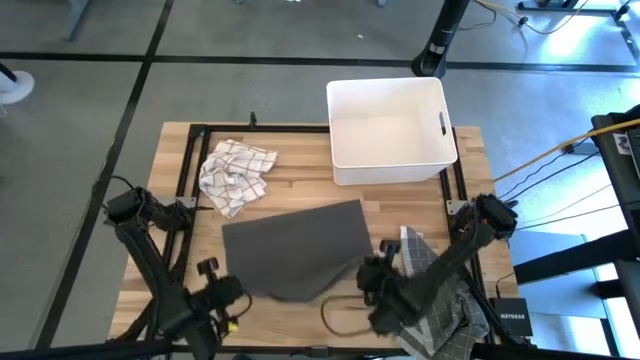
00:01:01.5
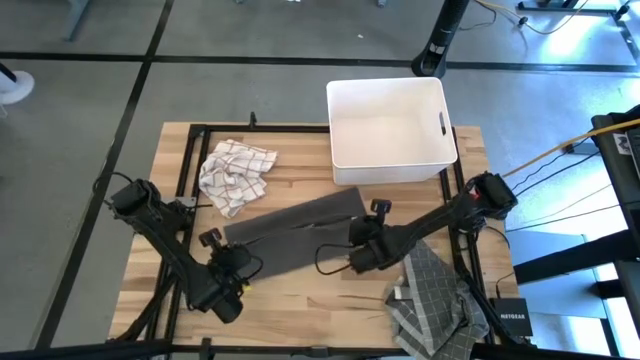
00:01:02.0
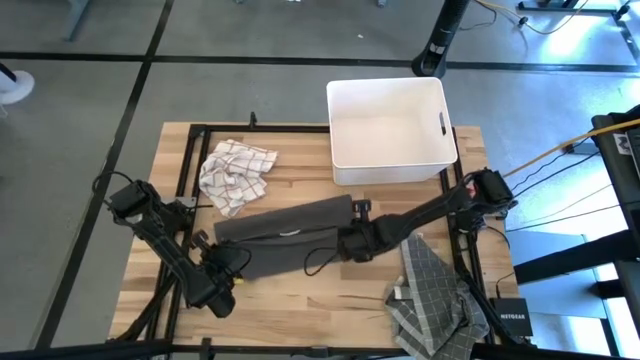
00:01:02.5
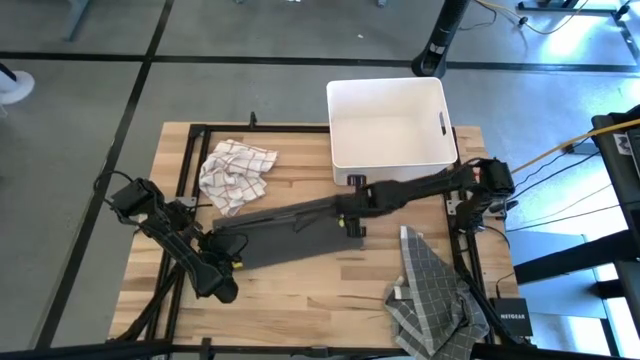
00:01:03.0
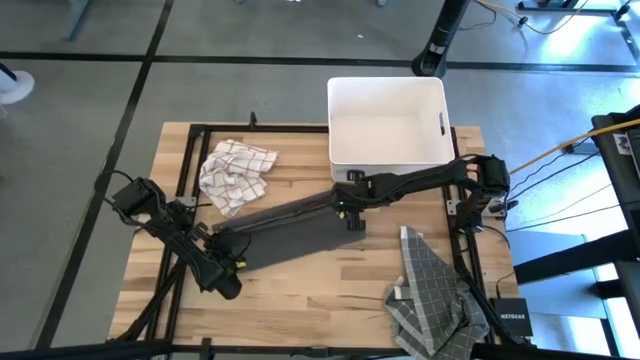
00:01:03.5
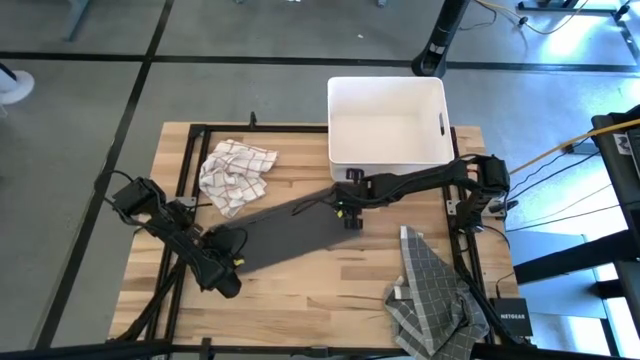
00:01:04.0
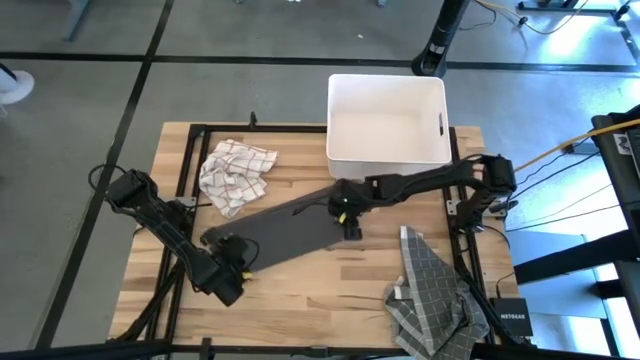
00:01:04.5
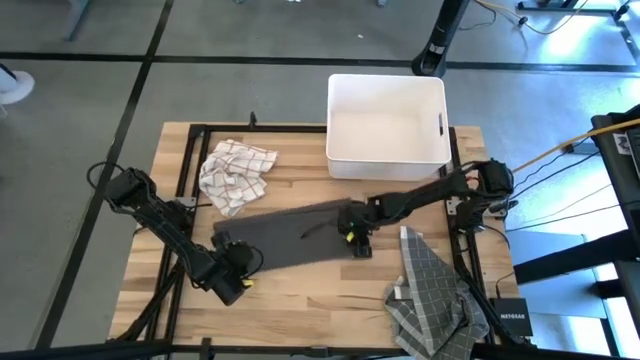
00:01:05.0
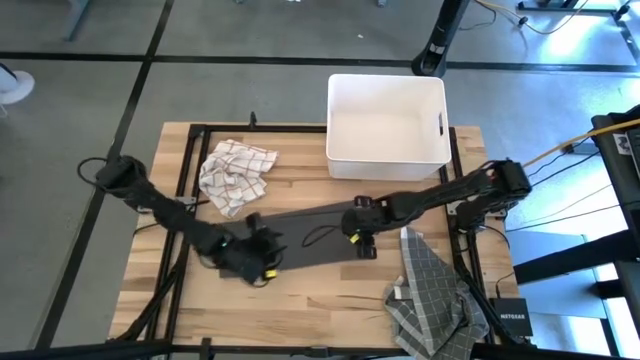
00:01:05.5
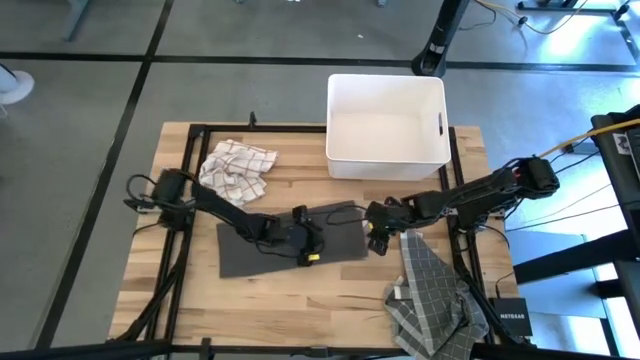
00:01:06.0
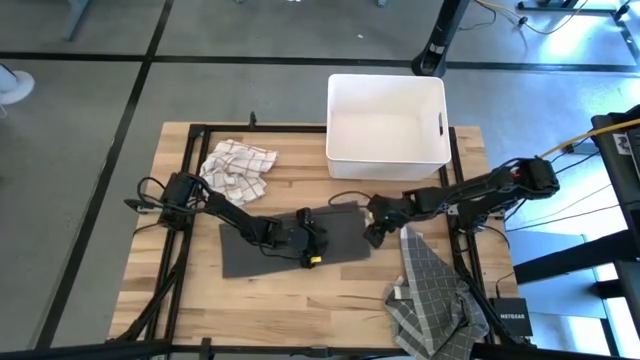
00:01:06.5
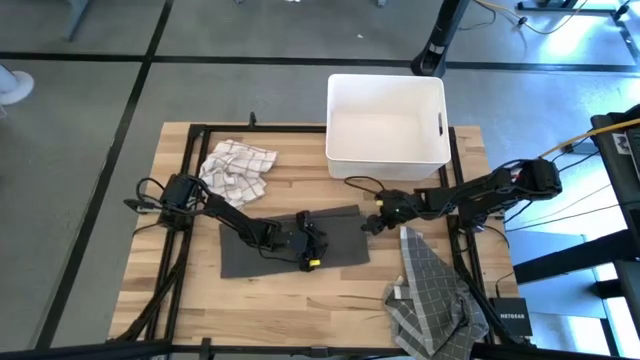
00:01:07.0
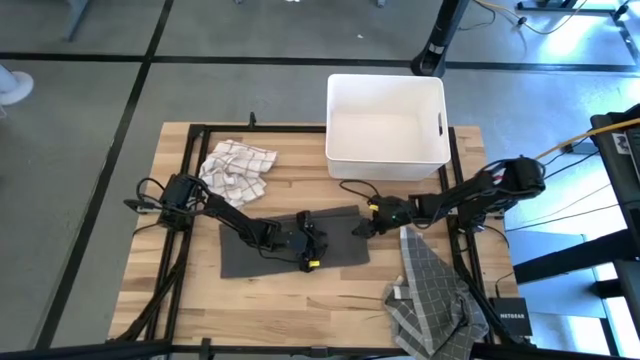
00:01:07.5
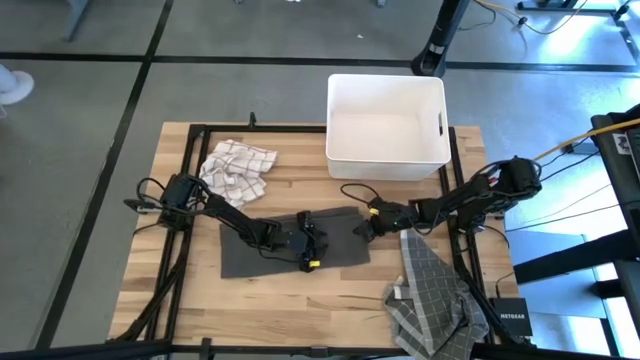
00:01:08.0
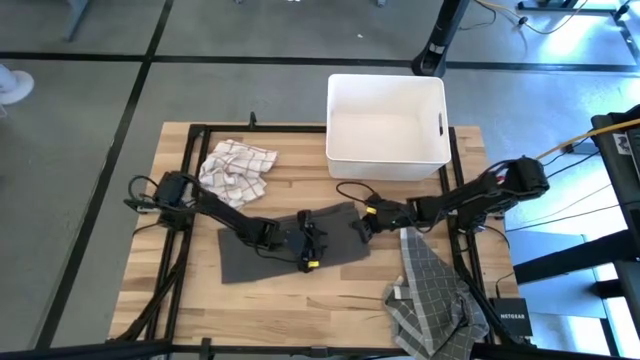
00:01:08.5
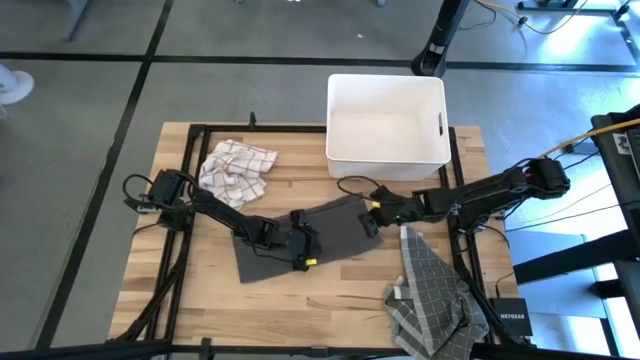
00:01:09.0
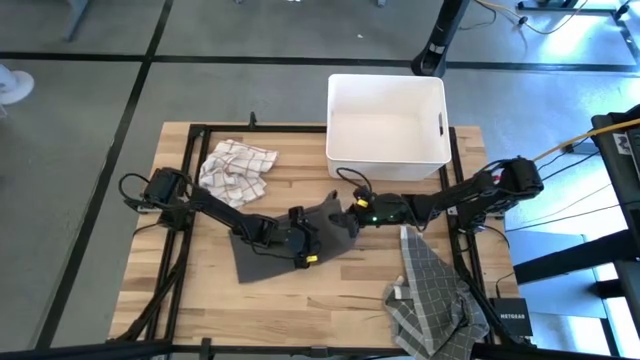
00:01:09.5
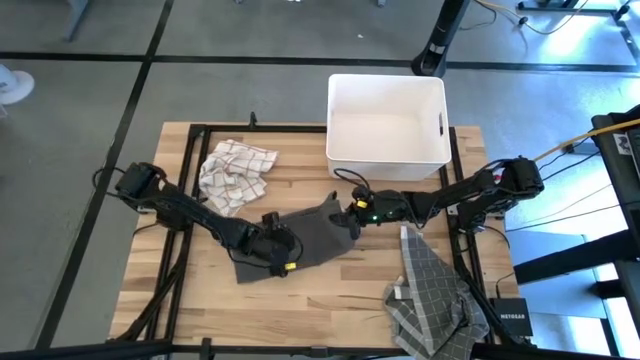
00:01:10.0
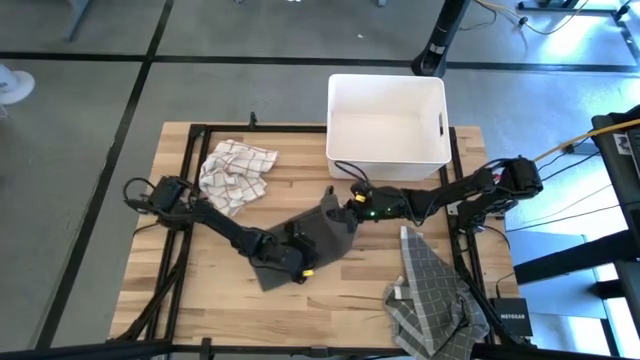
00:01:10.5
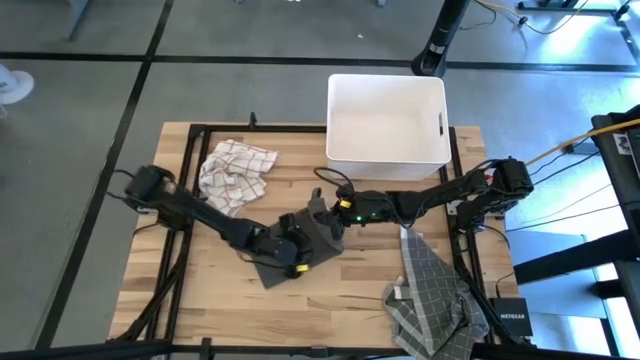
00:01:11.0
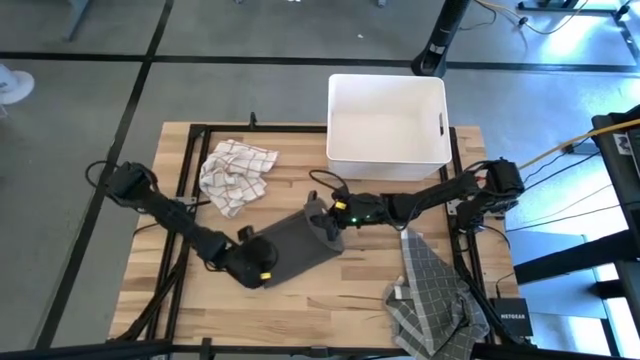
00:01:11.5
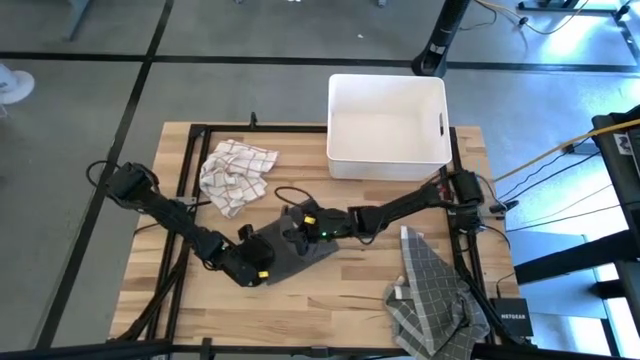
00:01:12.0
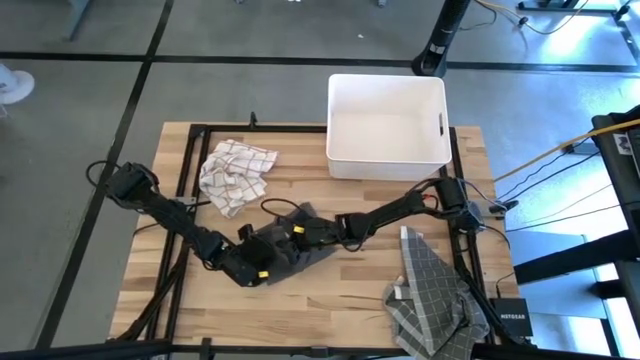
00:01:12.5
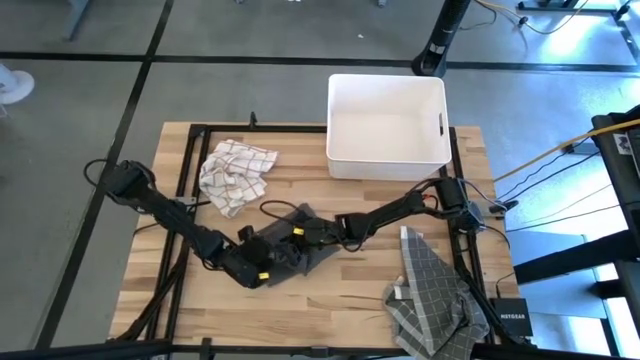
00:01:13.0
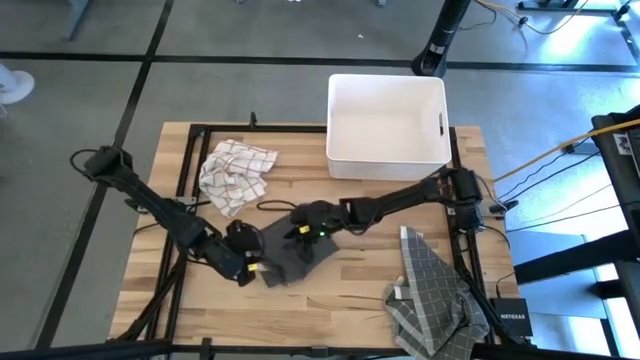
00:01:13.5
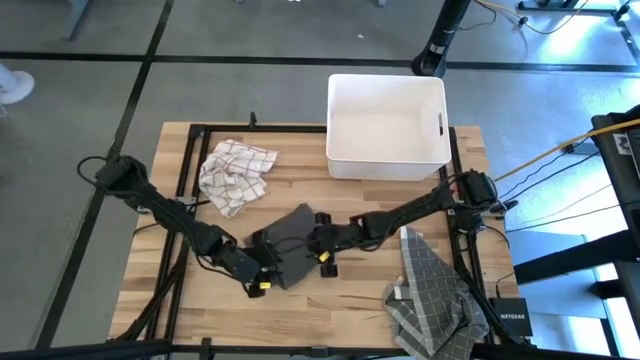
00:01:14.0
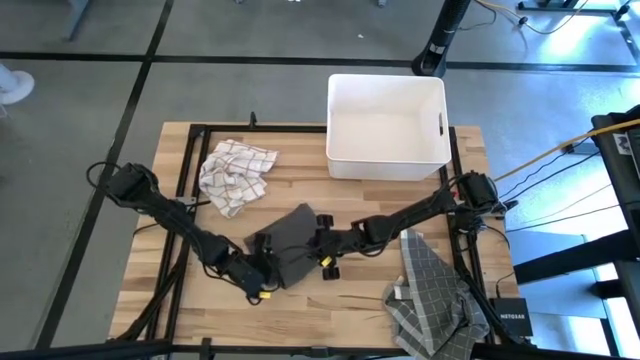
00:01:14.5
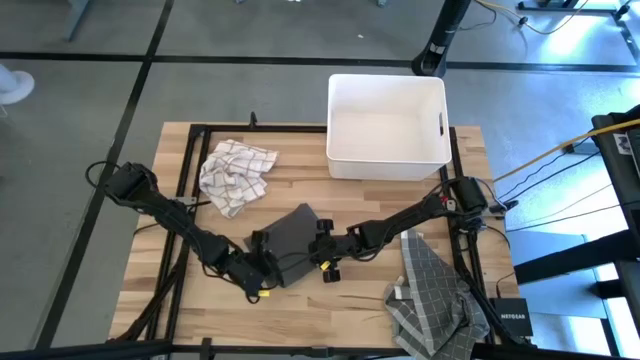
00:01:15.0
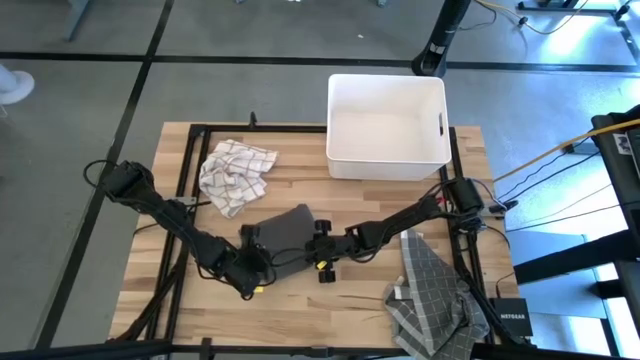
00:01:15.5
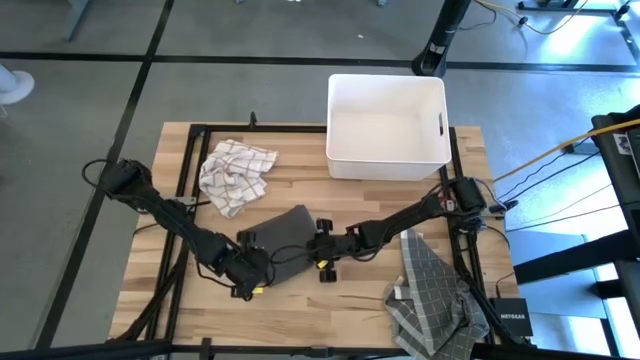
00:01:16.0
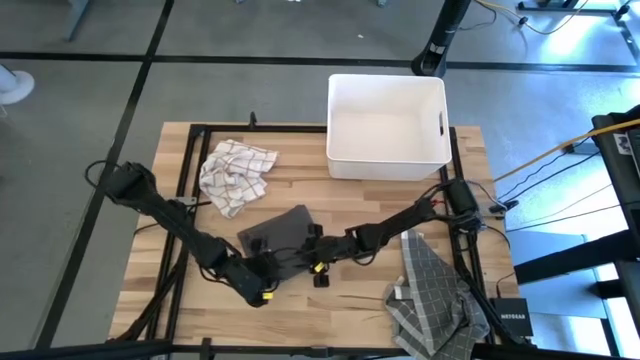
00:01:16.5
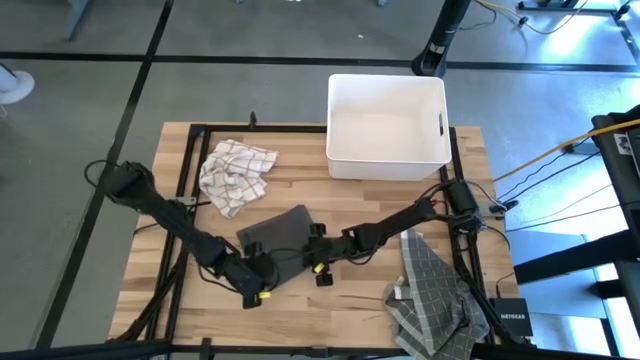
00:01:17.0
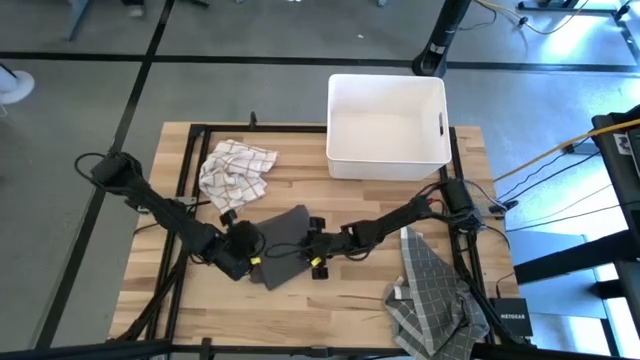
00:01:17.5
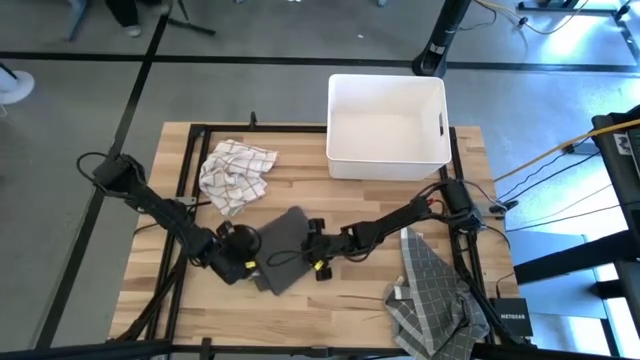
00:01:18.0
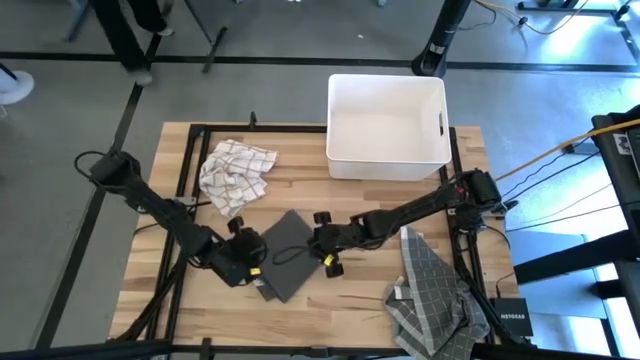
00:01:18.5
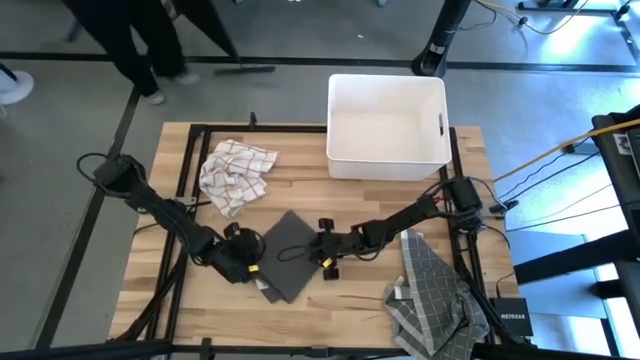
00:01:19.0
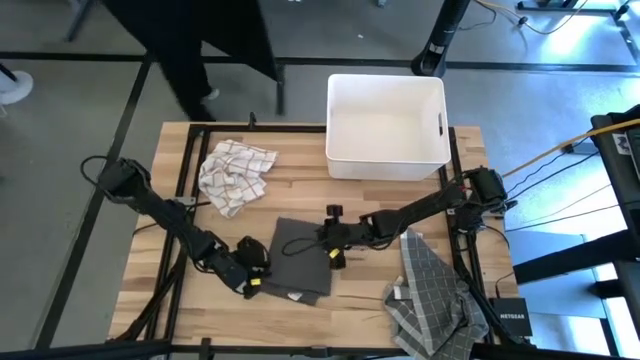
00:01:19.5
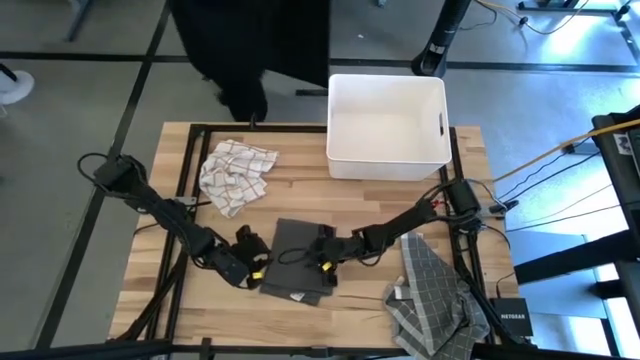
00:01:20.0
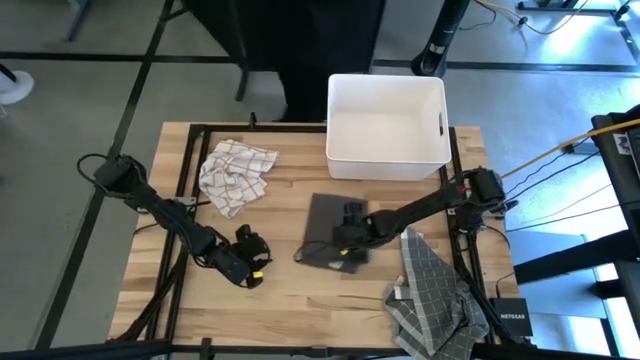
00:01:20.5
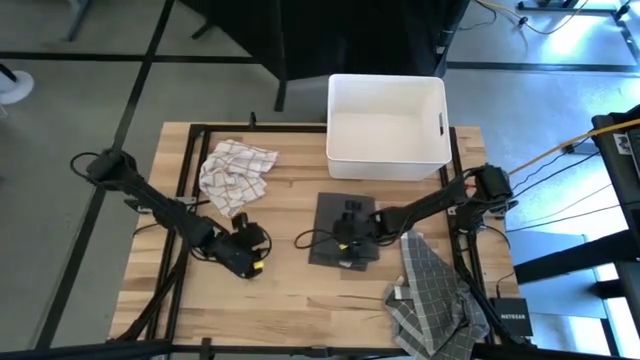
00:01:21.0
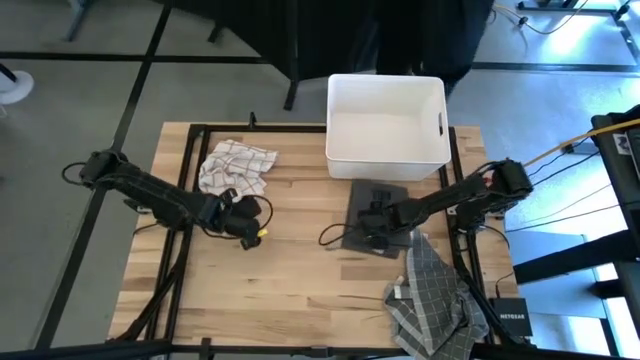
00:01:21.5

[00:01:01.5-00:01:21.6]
Task: Fold towel
Fold the gray towel

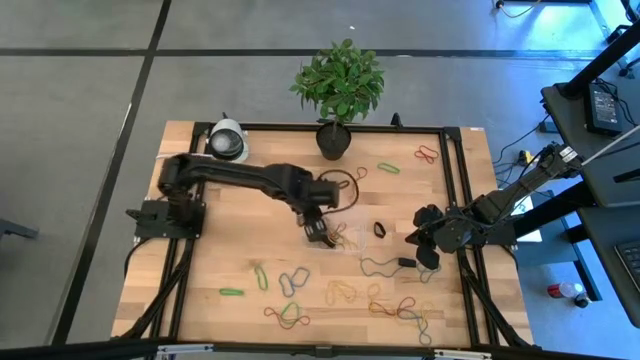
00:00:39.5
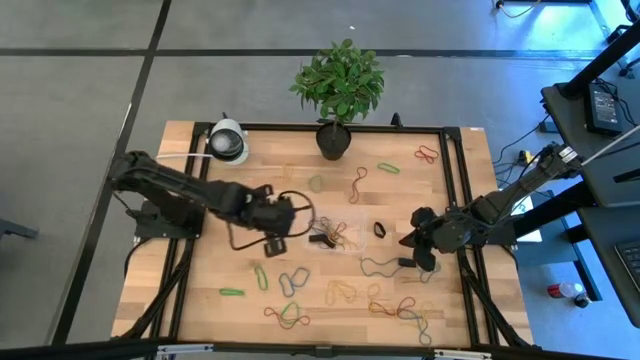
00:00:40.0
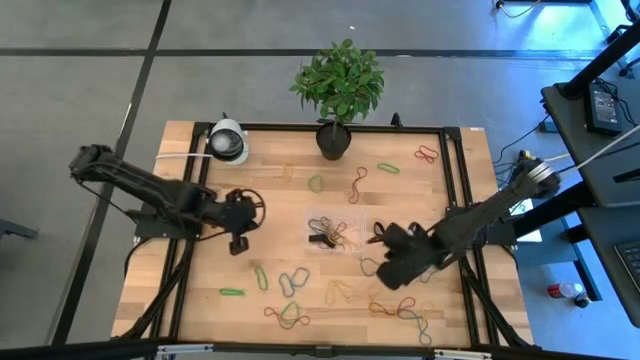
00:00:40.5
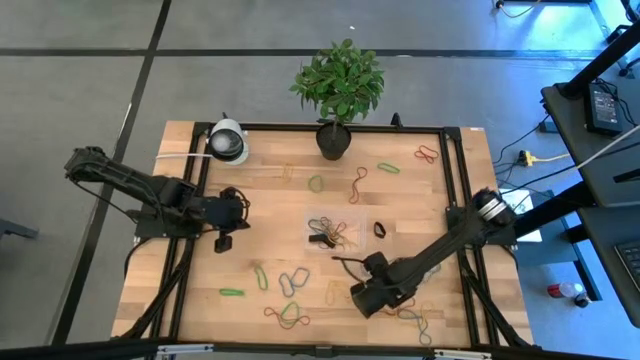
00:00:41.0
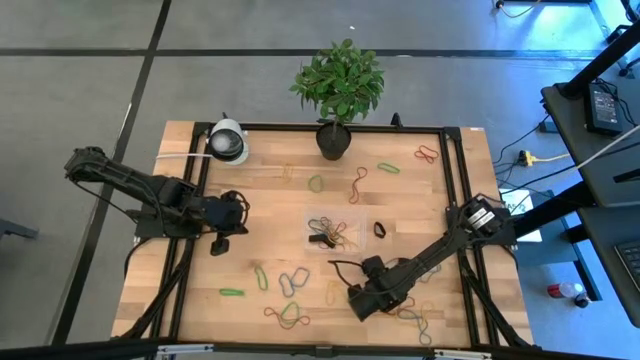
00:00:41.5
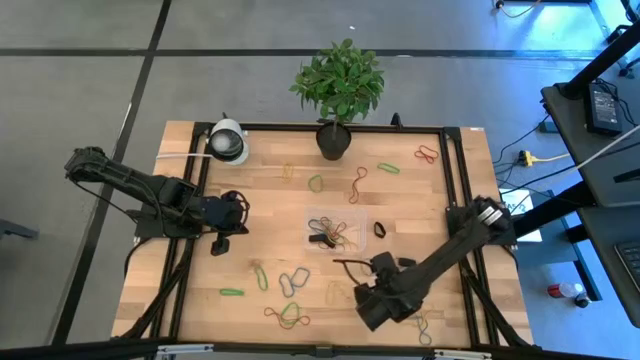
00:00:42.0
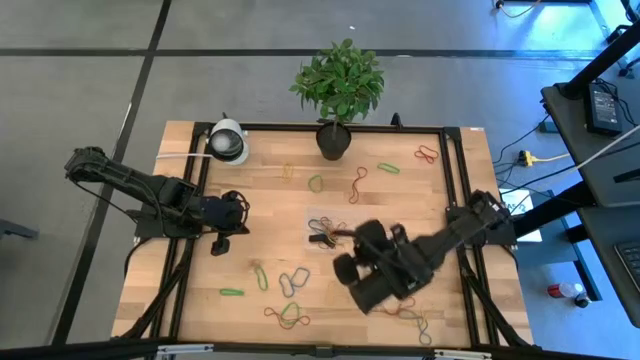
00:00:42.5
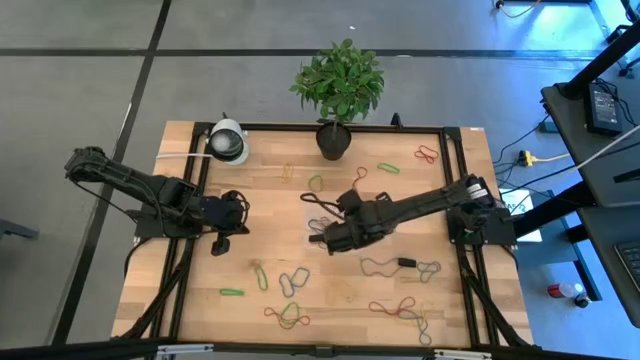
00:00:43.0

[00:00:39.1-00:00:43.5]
Task: Pick and place rubber bands into bin
Put the yellow rubber band into the bin
